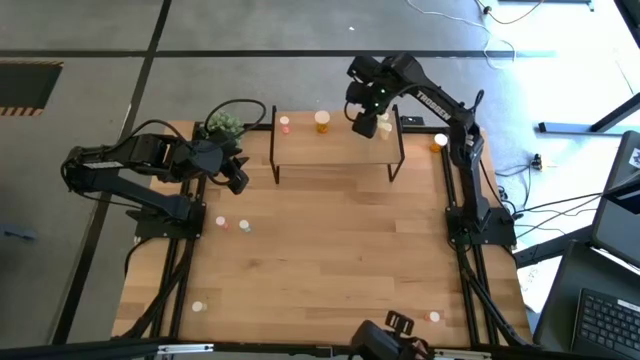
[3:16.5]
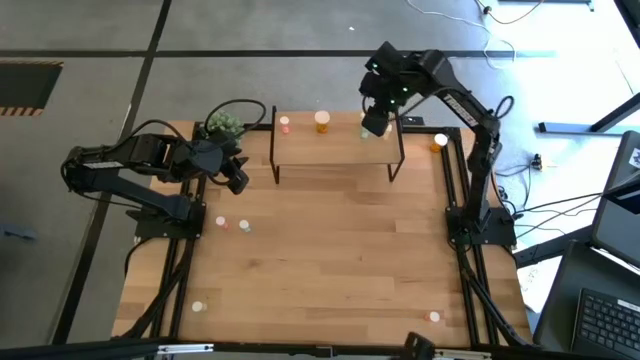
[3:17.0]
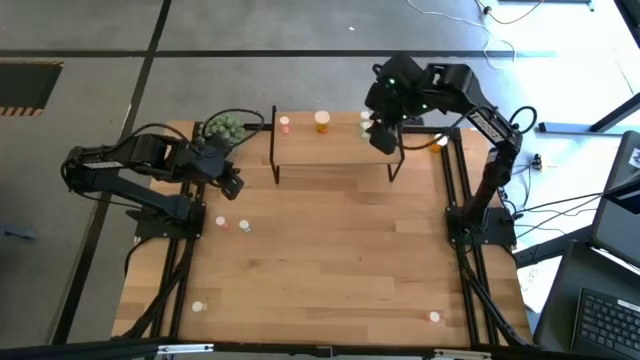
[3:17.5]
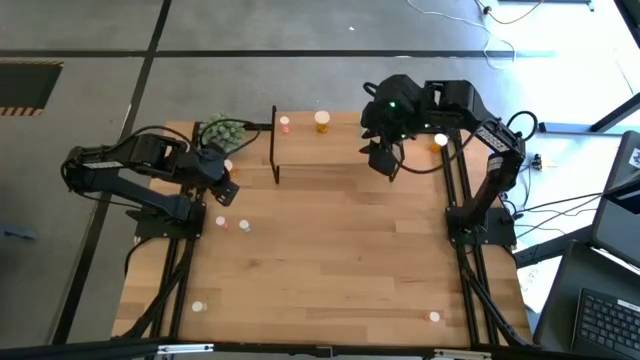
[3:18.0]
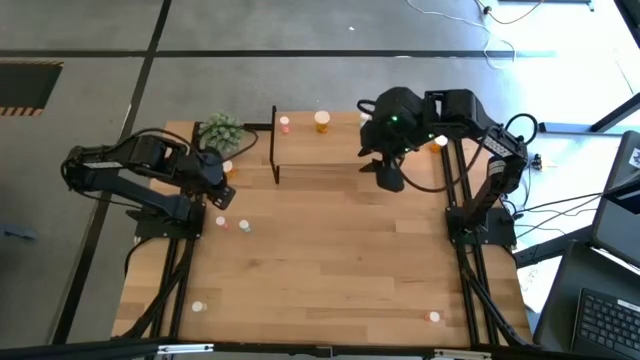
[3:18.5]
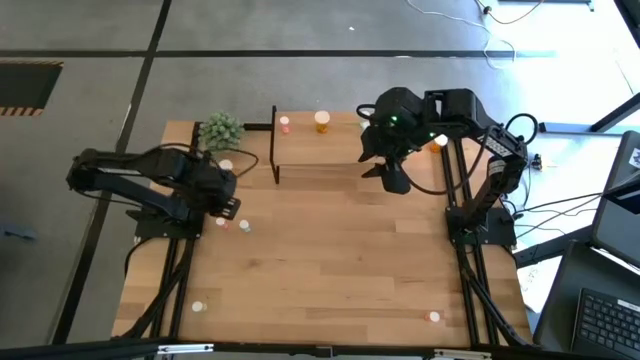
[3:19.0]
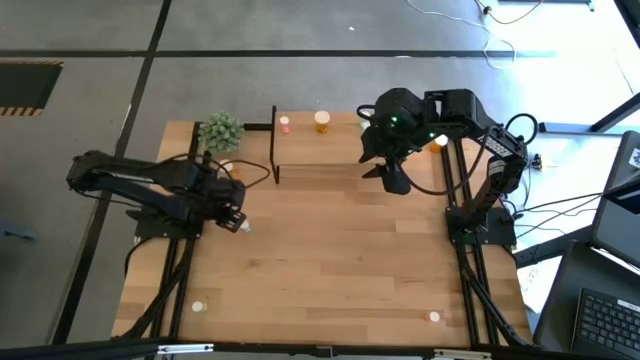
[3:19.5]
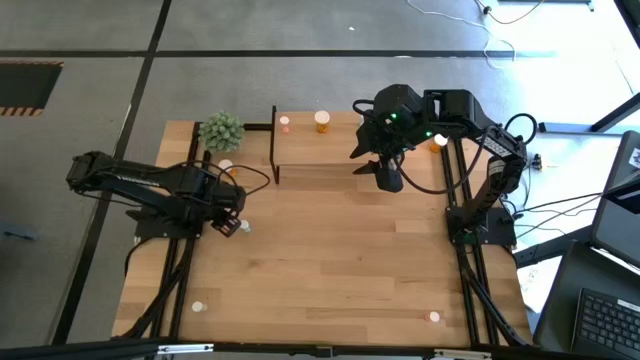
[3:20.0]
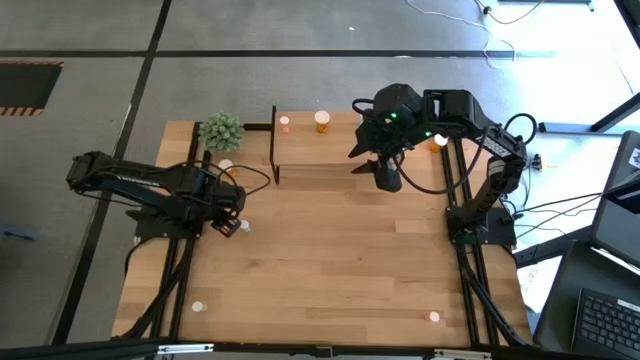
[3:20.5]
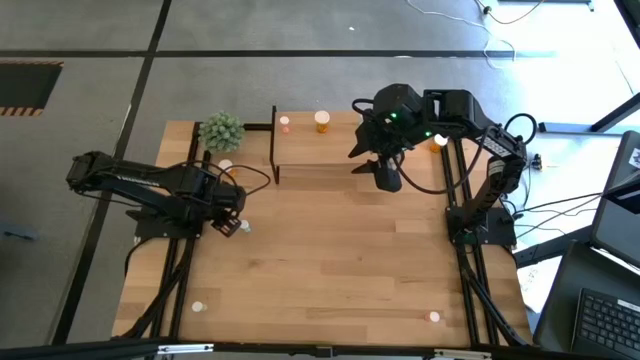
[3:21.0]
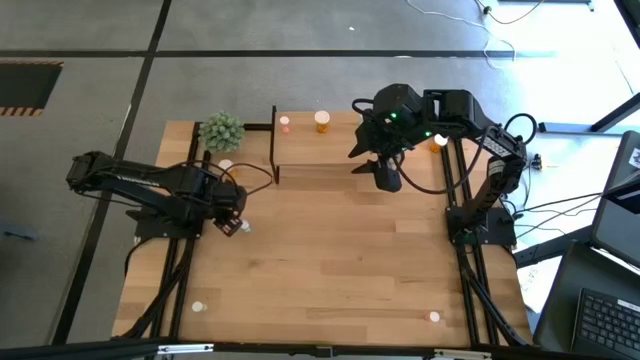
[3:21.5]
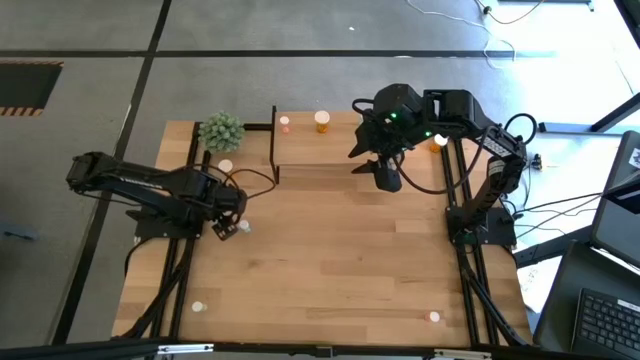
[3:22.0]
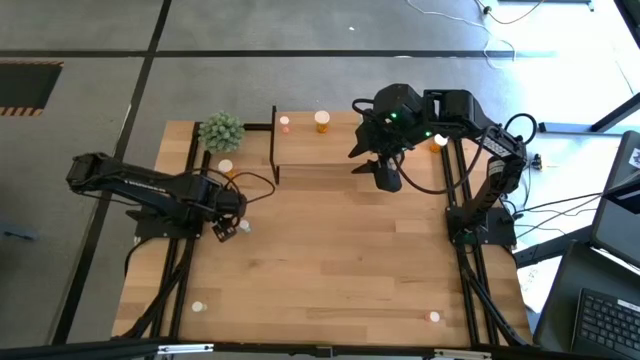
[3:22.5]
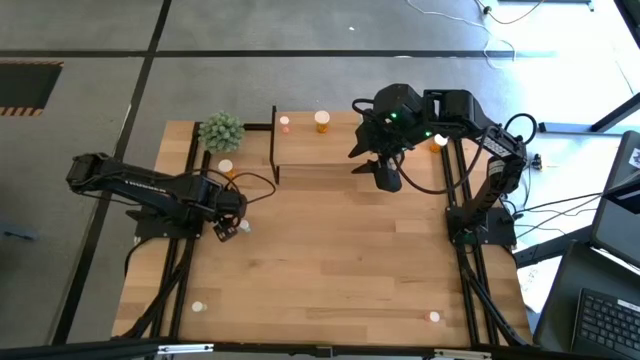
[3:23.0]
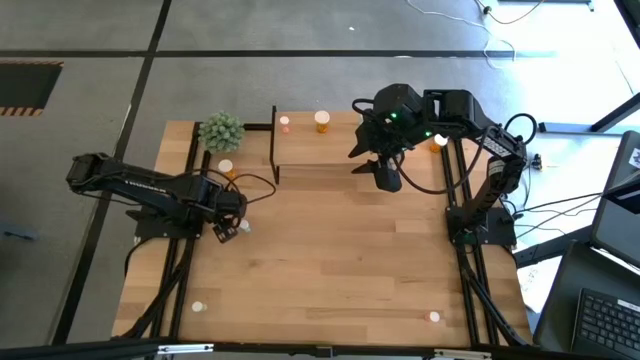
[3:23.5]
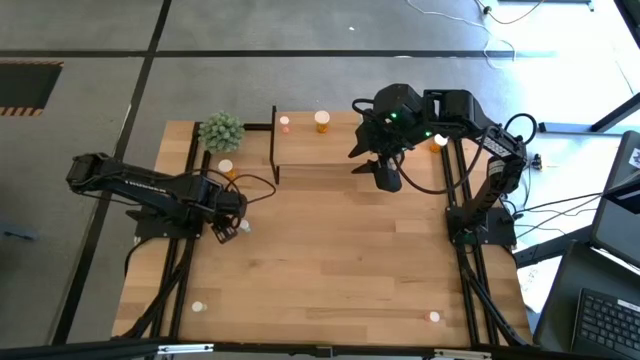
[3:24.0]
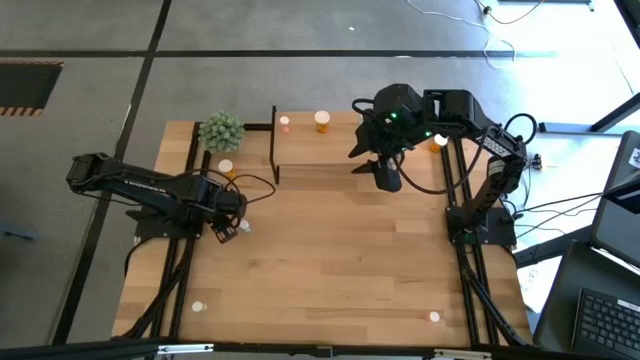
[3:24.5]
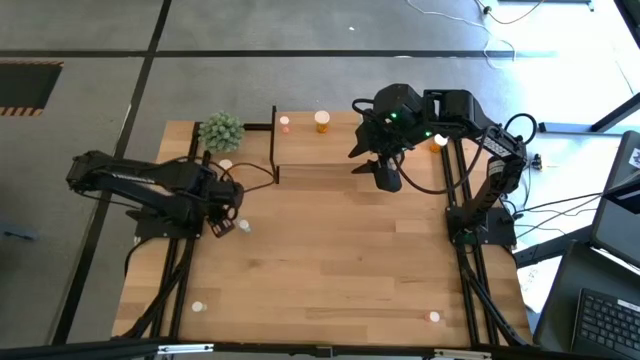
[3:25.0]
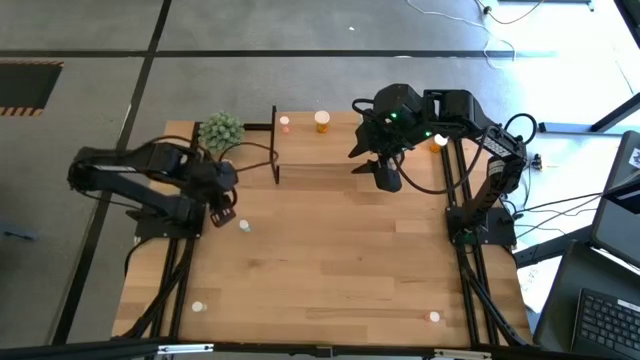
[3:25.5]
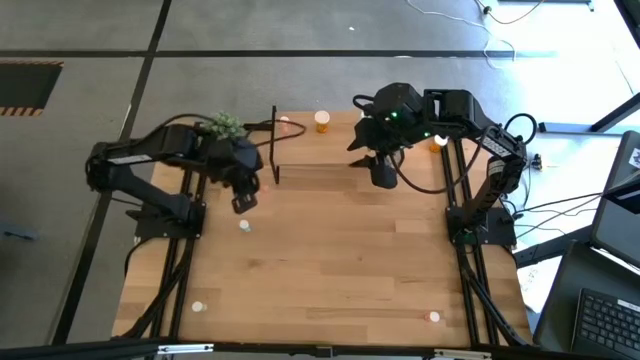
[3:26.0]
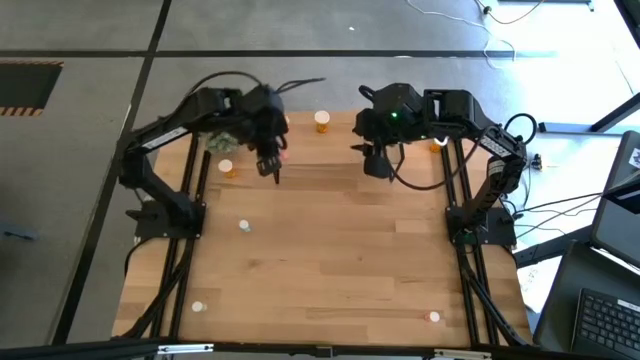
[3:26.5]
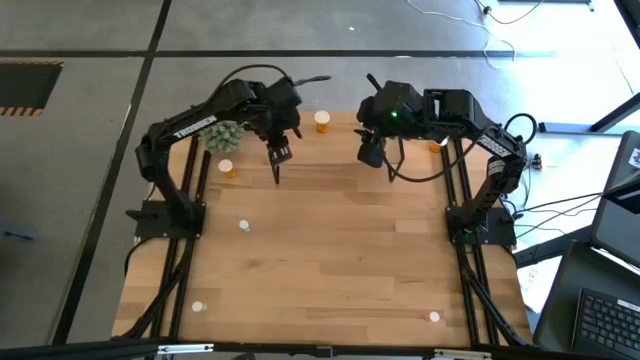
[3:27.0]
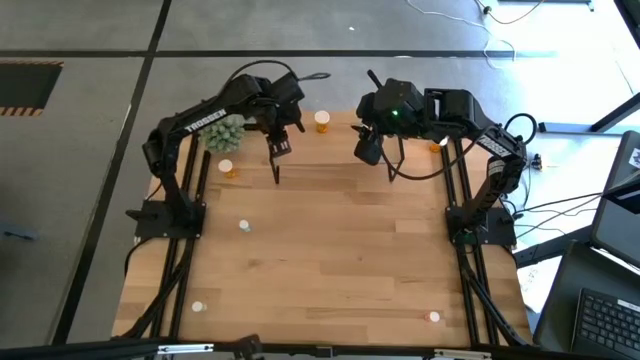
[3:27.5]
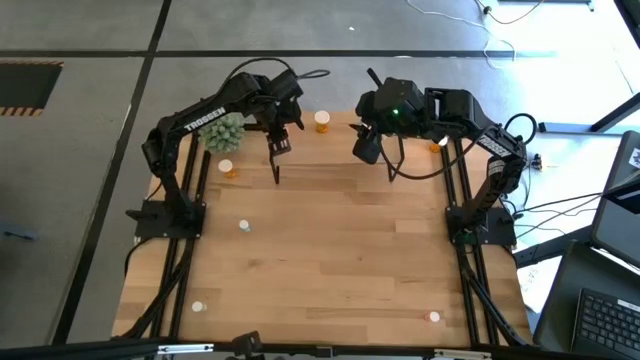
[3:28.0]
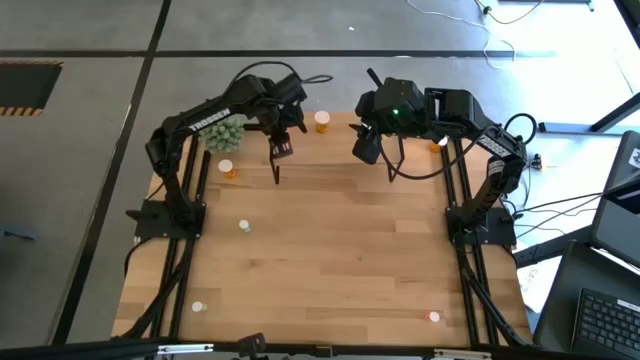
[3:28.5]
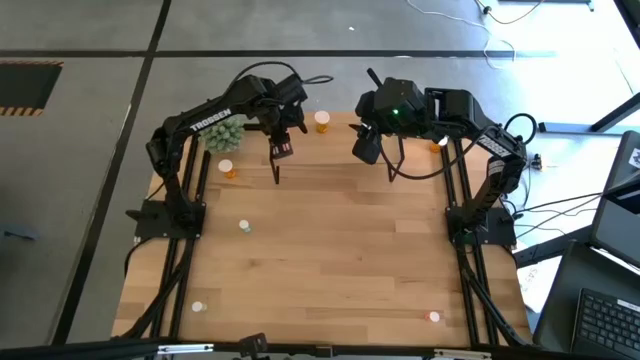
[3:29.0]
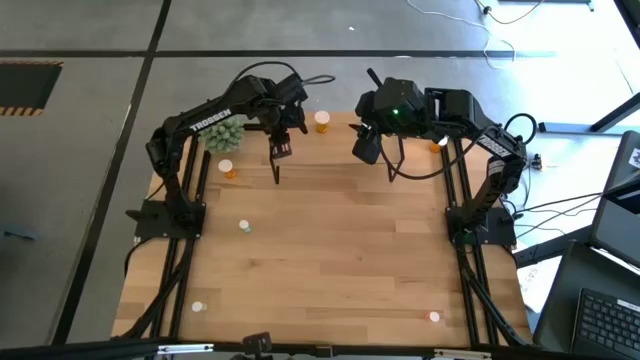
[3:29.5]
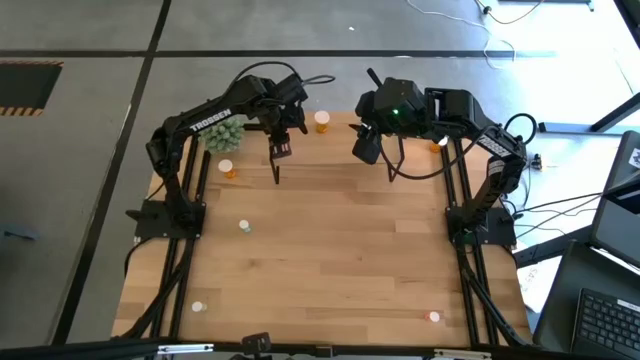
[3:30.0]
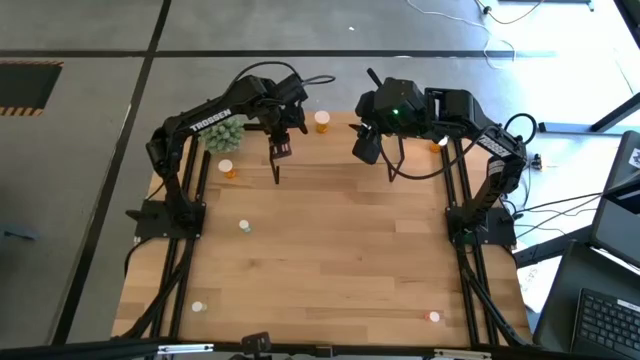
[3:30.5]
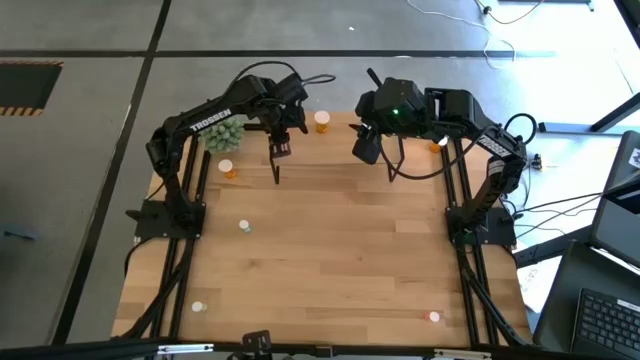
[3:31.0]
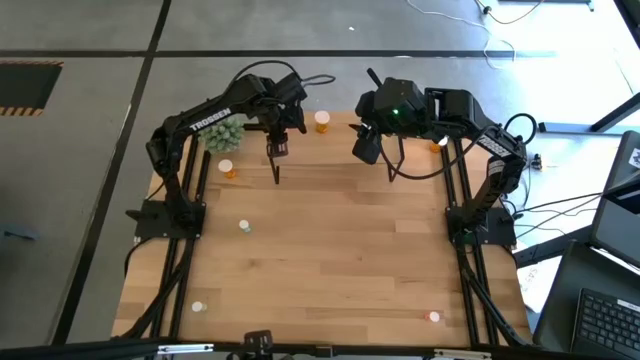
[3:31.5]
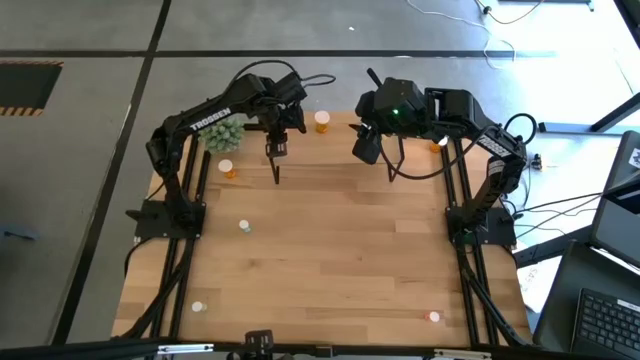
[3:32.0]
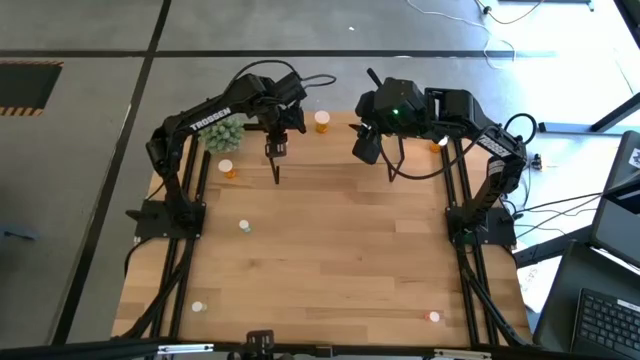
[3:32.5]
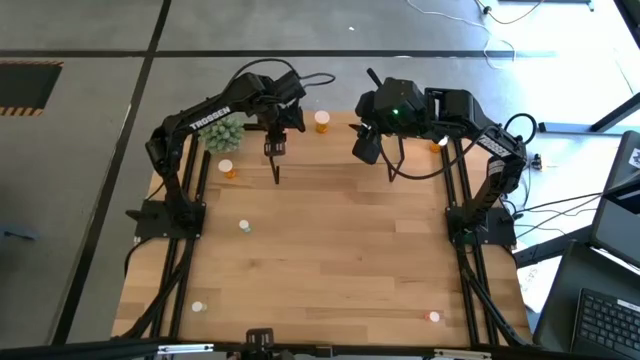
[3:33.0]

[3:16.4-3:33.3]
Task: Pick and place medicine bottles onto shelf by color
Put the top red medicine bottle on the shelf, aligned with the other red medicine bottle

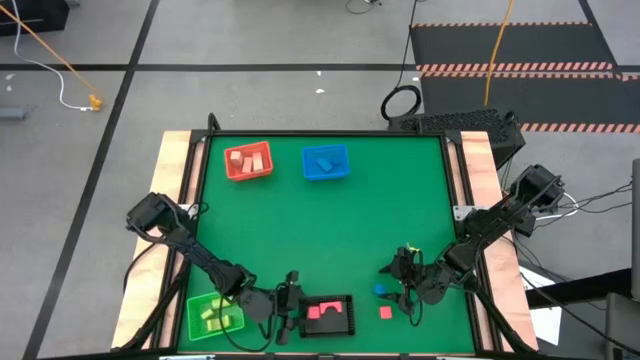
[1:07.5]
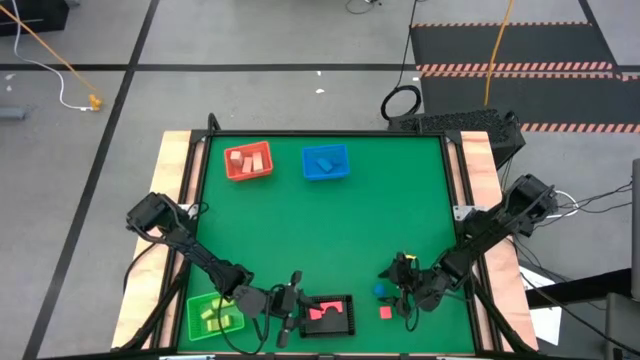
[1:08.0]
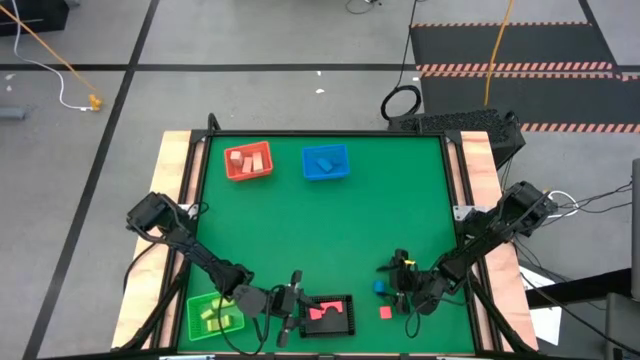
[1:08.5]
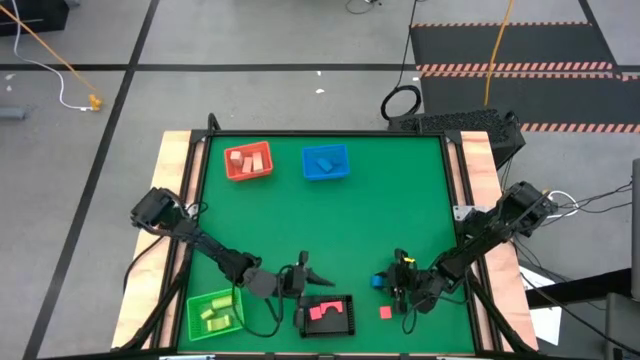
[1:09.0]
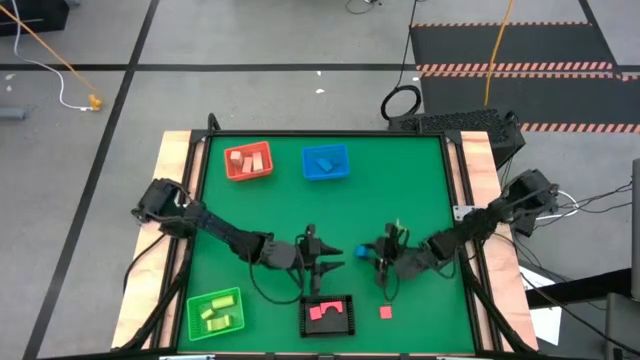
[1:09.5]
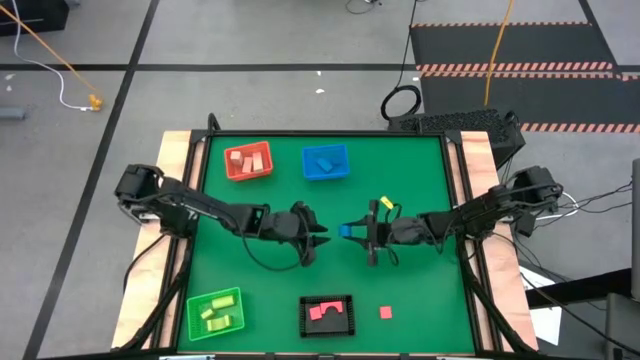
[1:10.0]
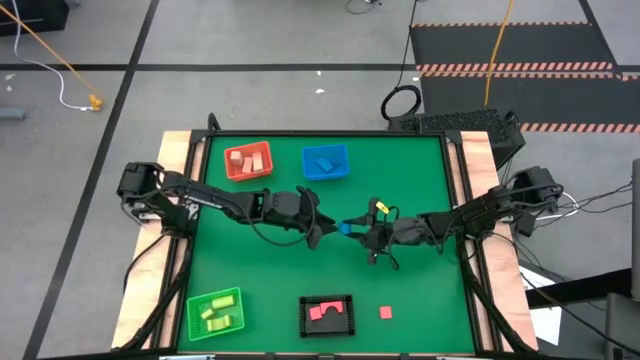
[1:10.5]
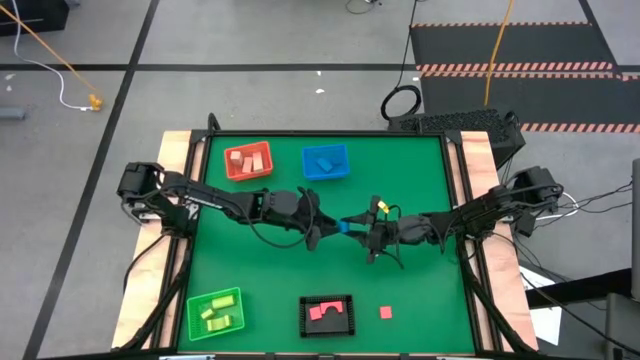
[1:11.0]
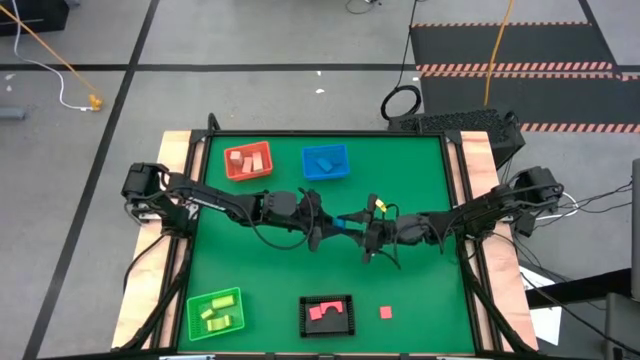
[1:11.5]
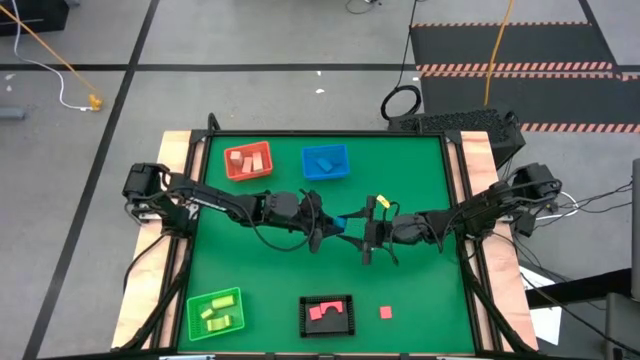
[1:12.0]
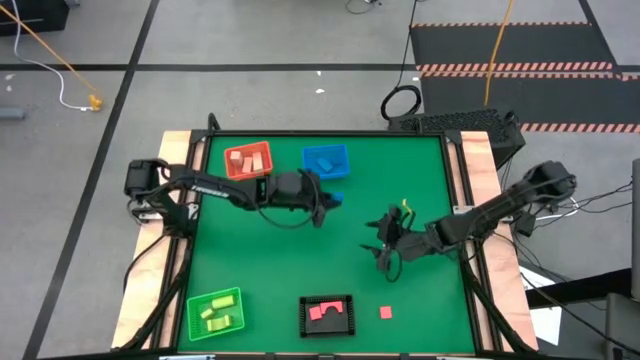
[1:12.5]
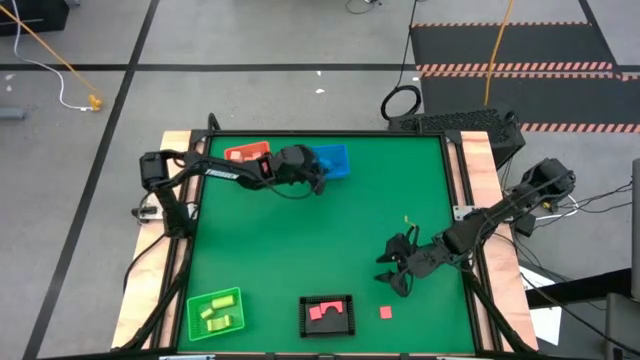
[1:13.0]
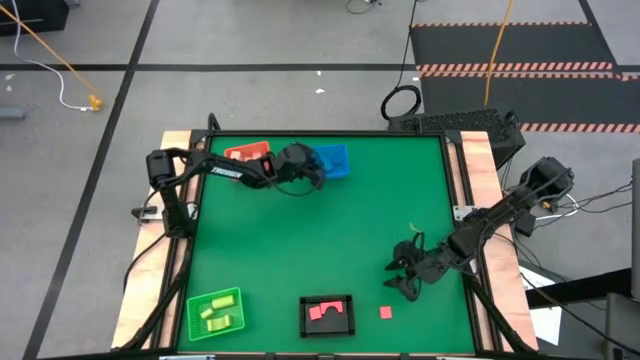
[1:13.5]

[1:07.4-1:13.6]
Task: Sort & place blocks by color
Put the blue block into the blue bin
